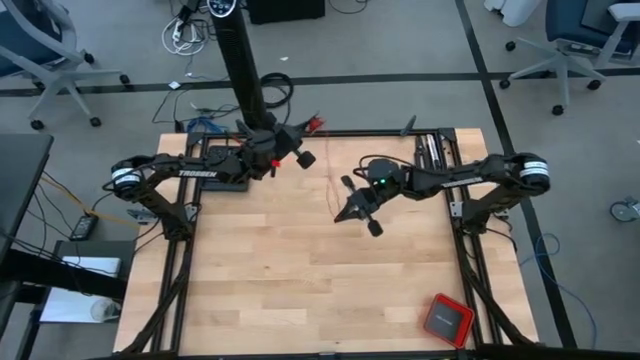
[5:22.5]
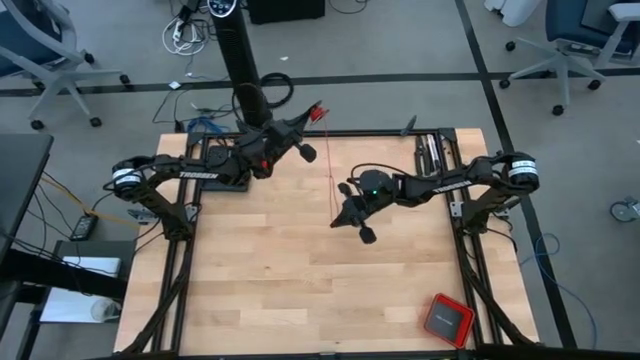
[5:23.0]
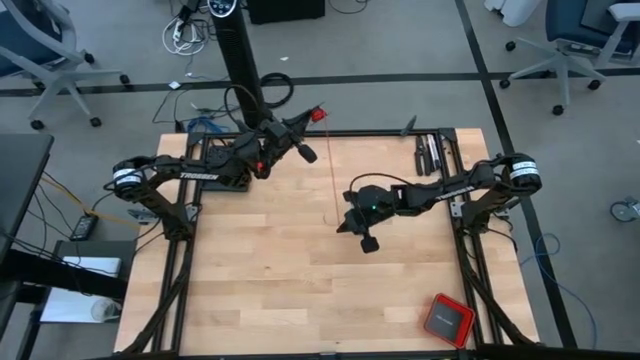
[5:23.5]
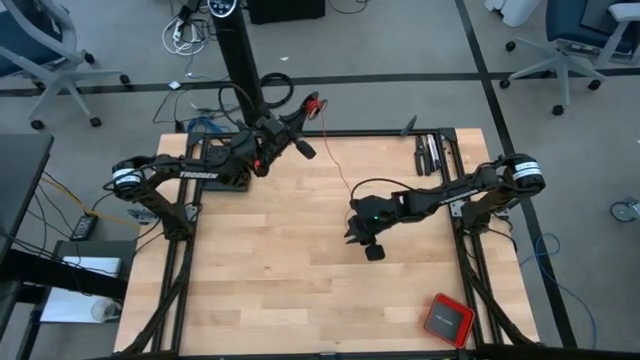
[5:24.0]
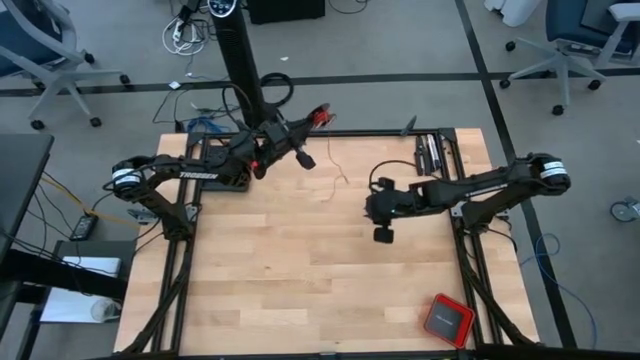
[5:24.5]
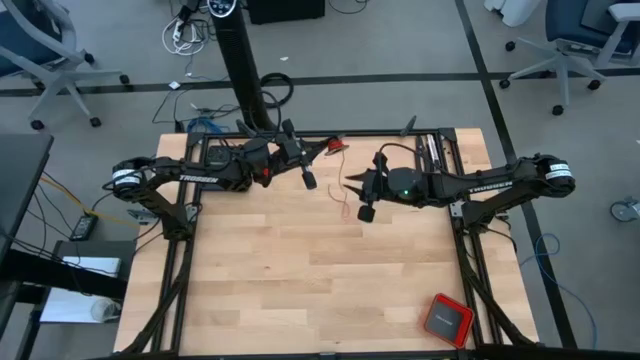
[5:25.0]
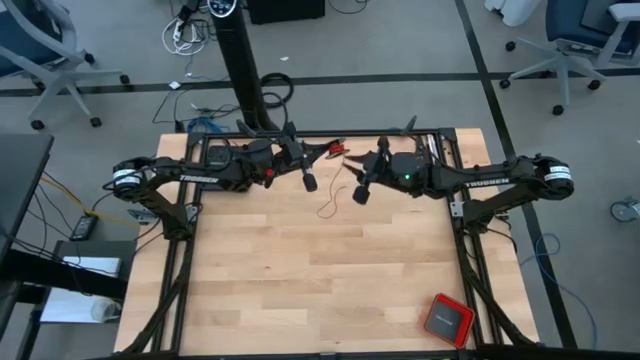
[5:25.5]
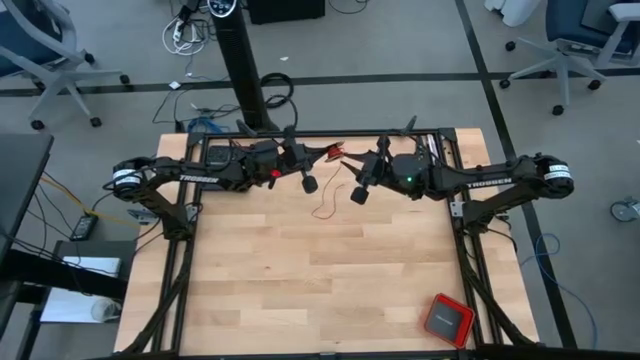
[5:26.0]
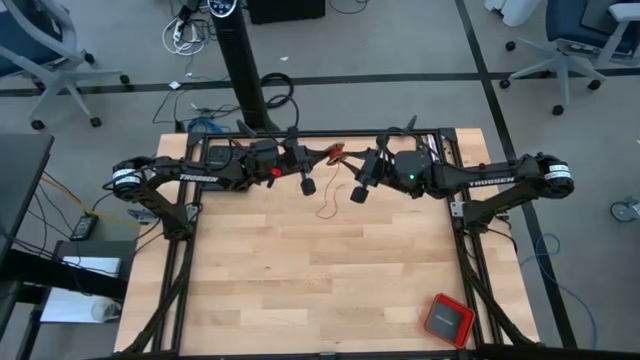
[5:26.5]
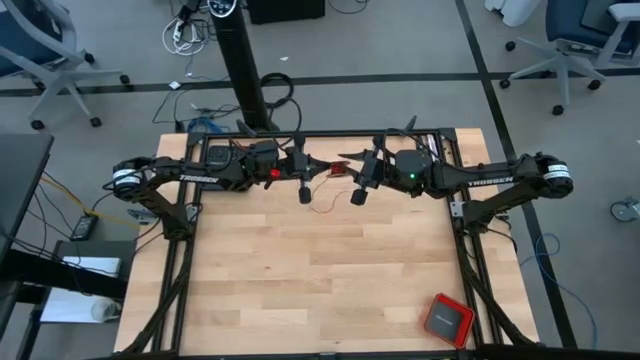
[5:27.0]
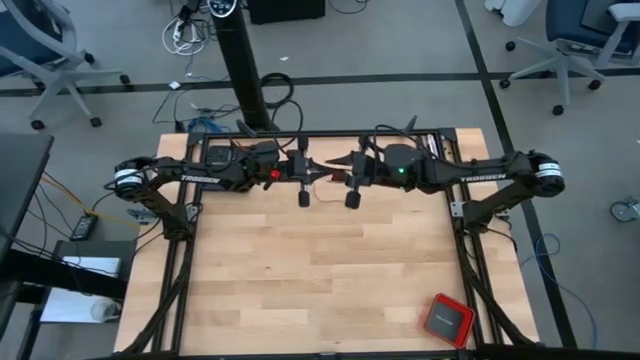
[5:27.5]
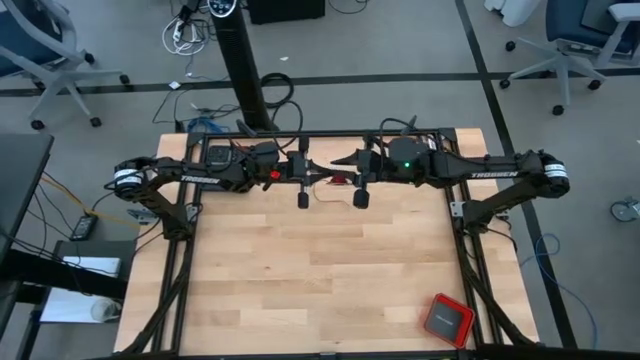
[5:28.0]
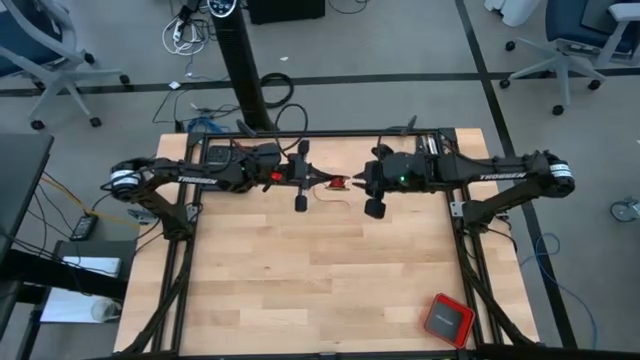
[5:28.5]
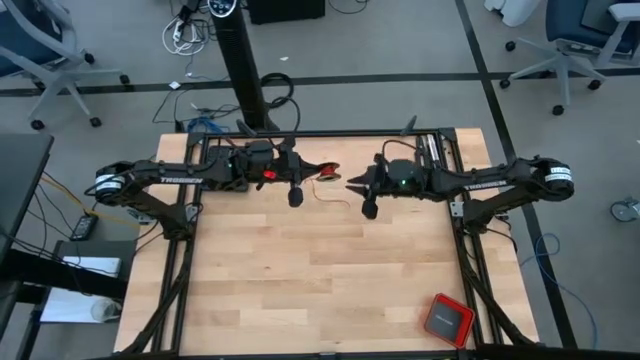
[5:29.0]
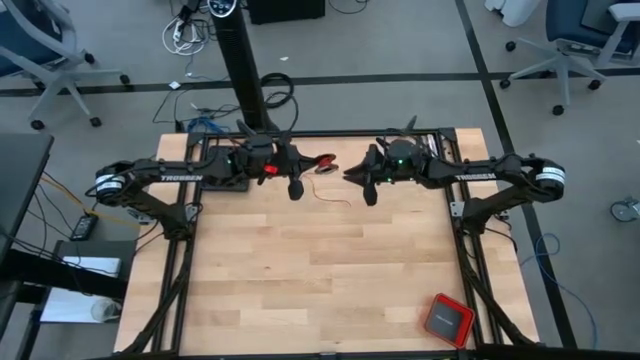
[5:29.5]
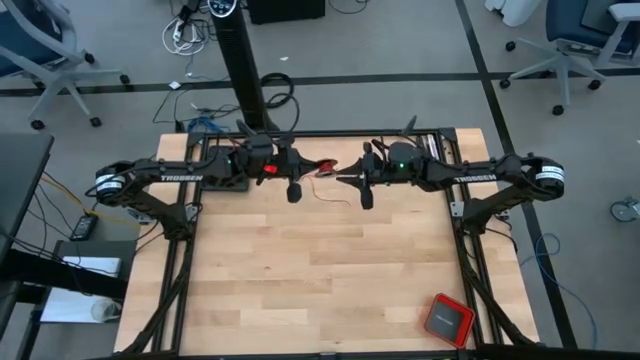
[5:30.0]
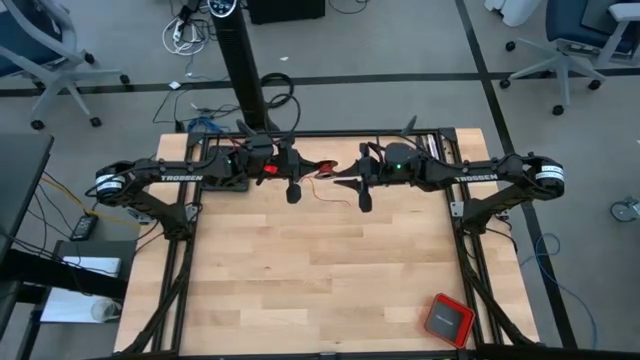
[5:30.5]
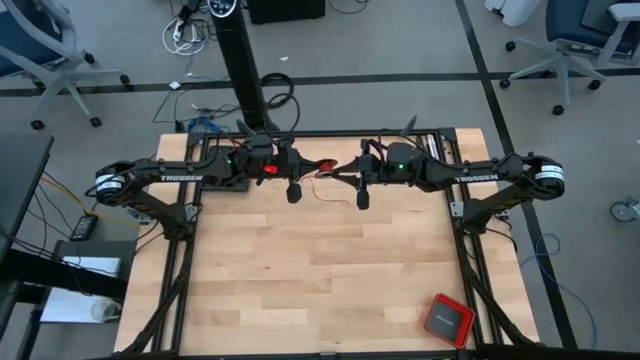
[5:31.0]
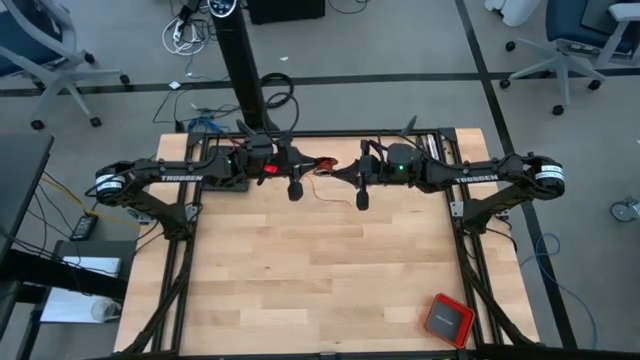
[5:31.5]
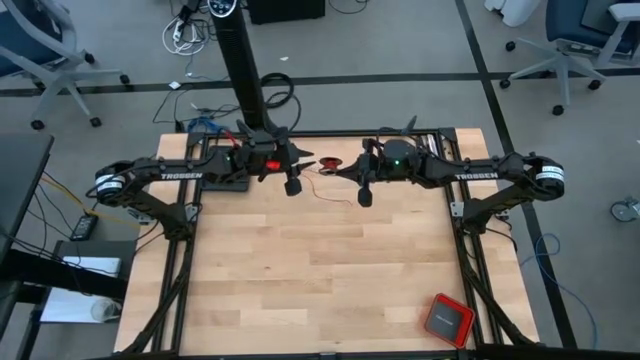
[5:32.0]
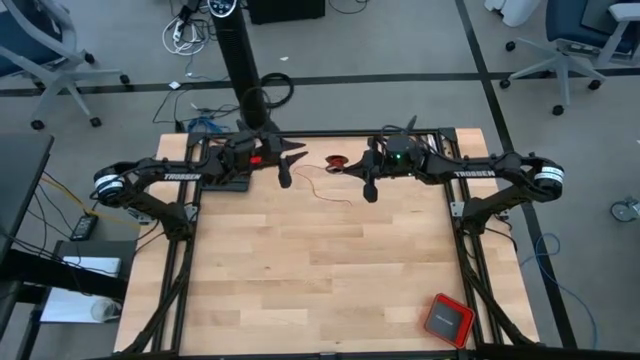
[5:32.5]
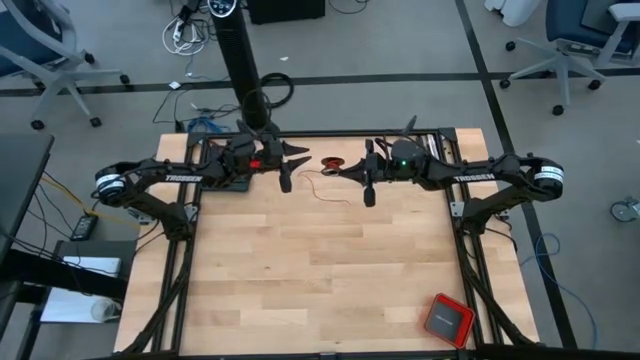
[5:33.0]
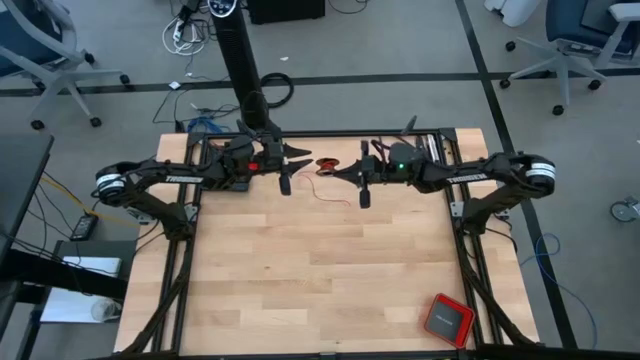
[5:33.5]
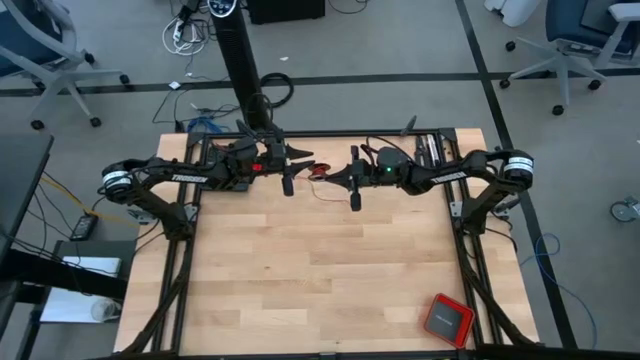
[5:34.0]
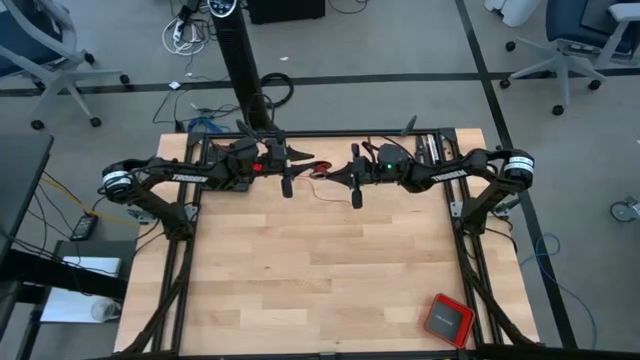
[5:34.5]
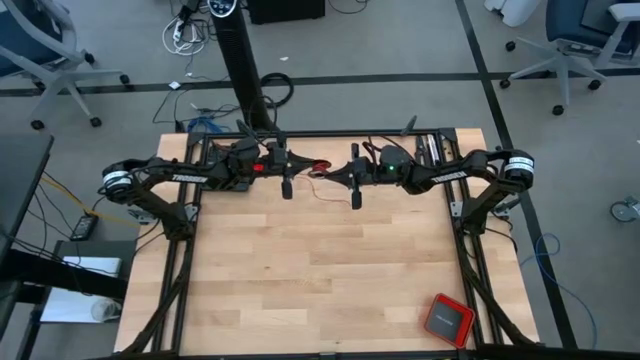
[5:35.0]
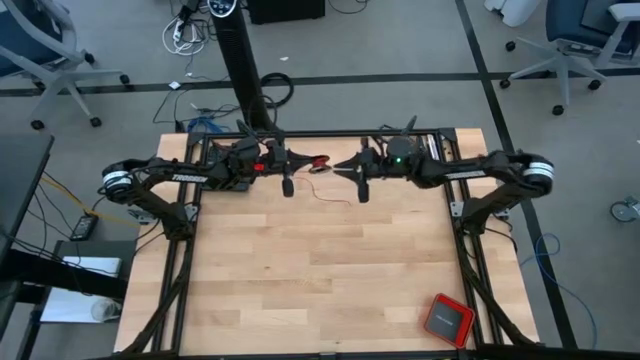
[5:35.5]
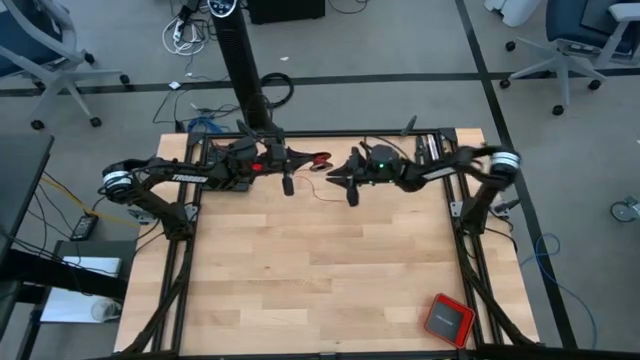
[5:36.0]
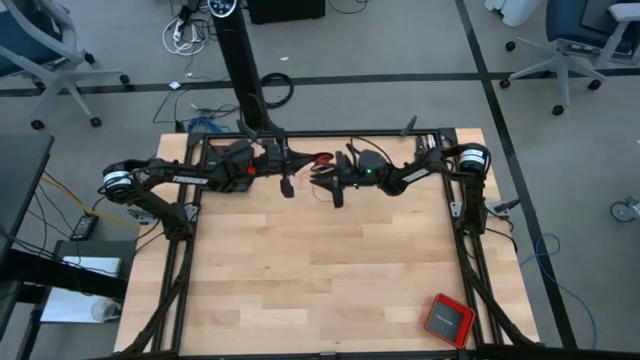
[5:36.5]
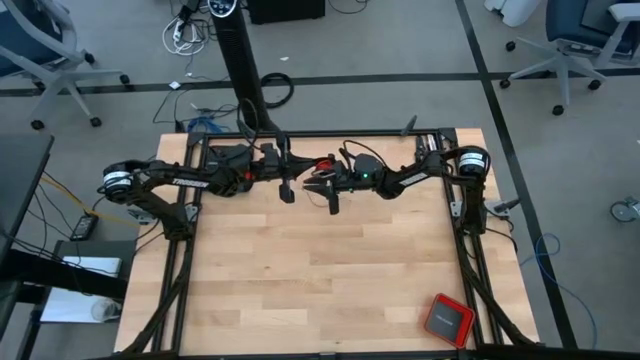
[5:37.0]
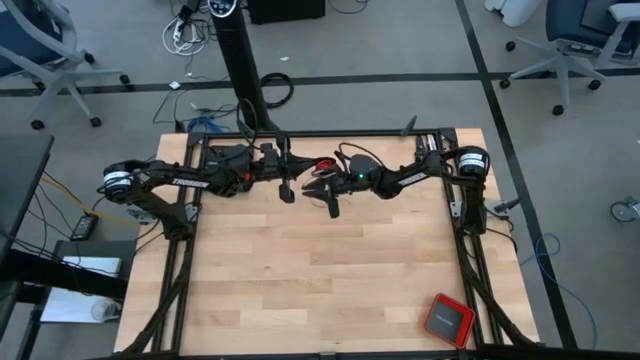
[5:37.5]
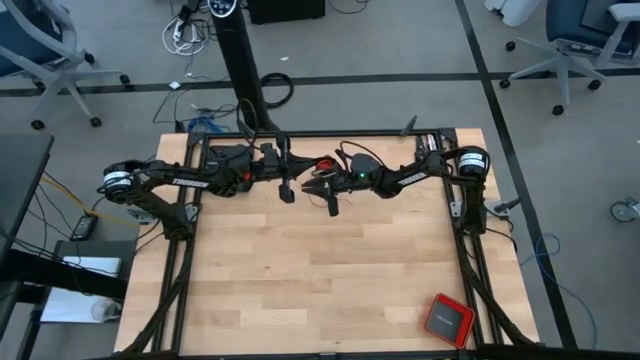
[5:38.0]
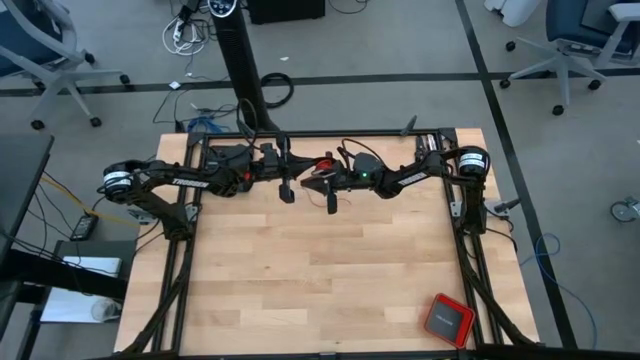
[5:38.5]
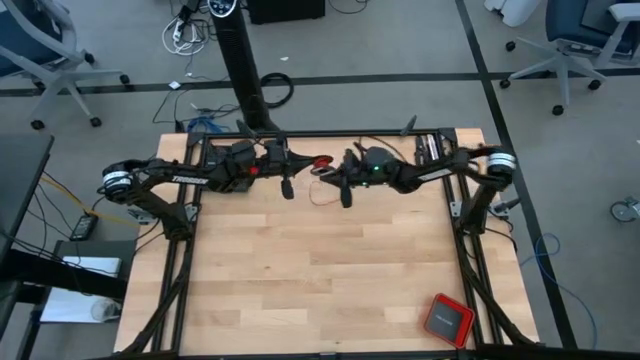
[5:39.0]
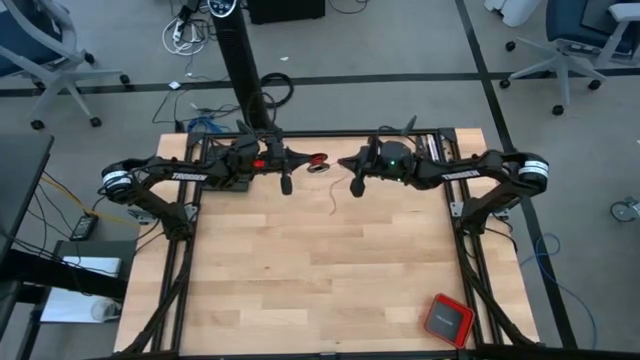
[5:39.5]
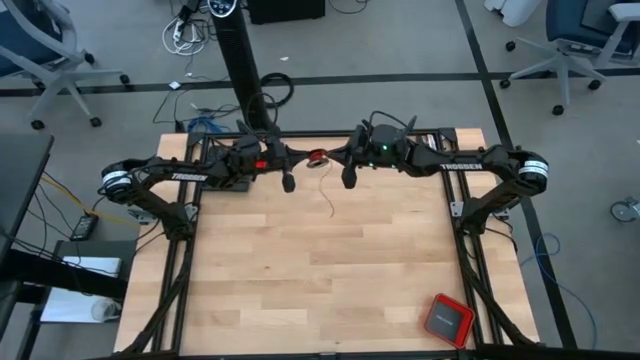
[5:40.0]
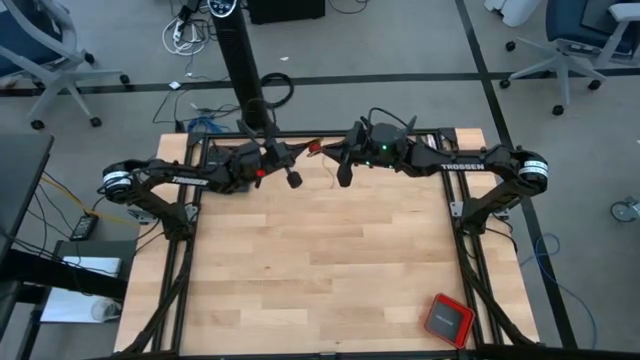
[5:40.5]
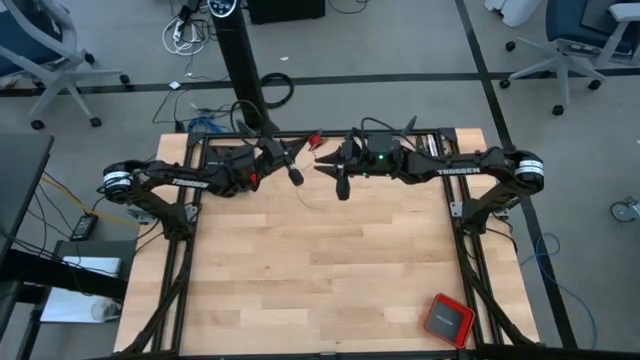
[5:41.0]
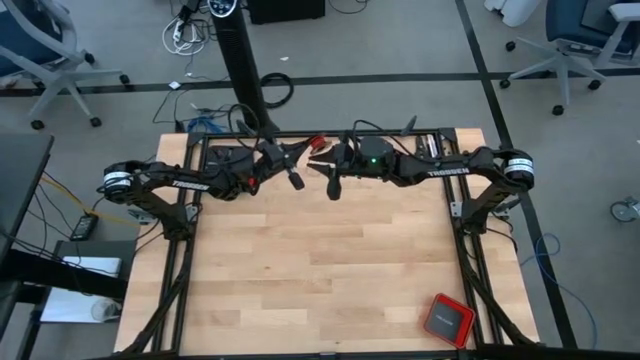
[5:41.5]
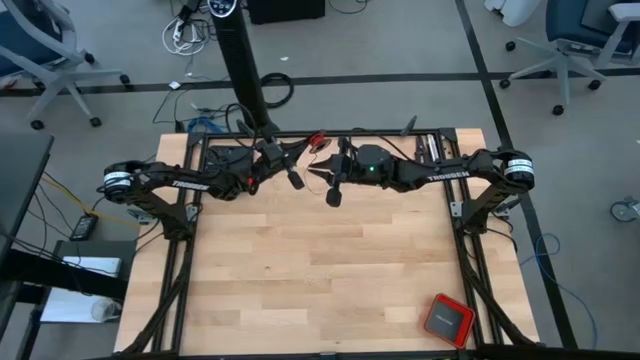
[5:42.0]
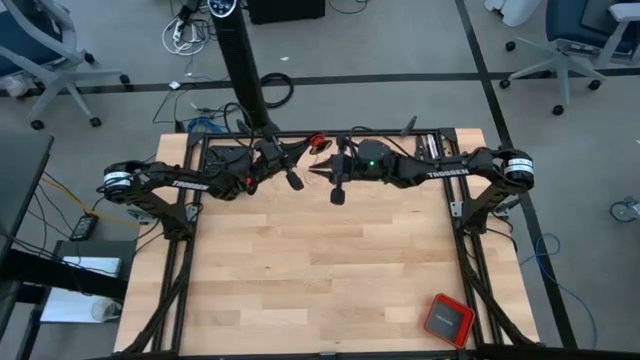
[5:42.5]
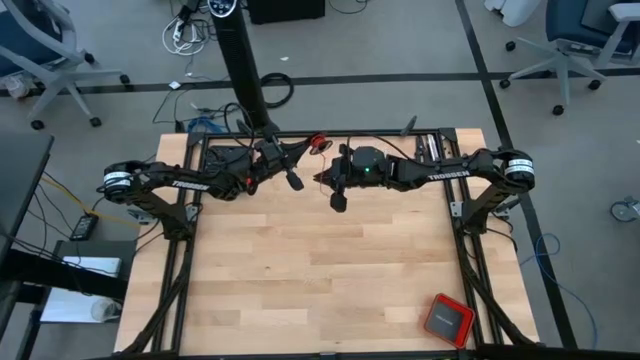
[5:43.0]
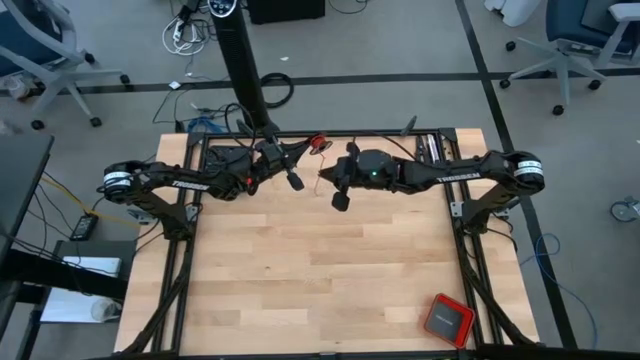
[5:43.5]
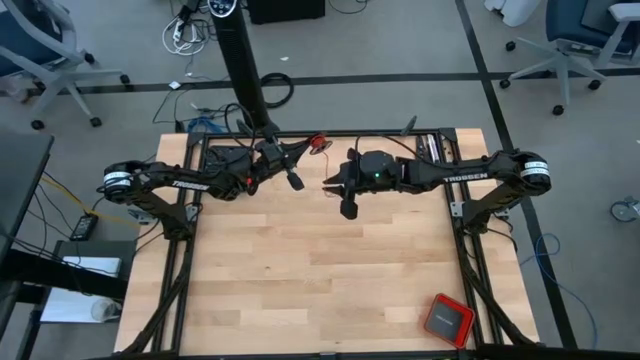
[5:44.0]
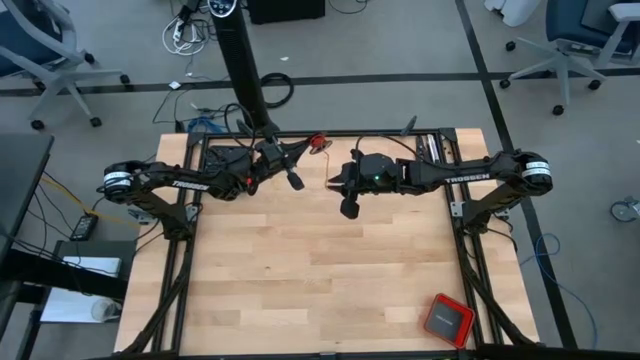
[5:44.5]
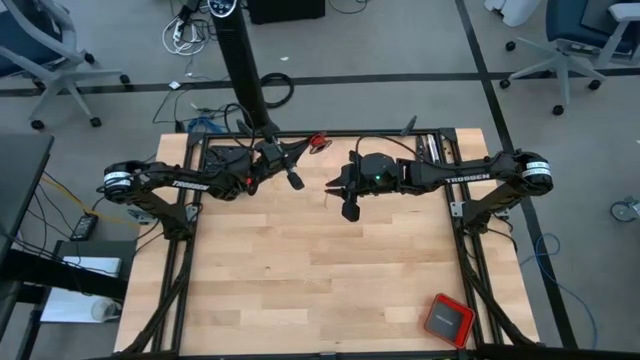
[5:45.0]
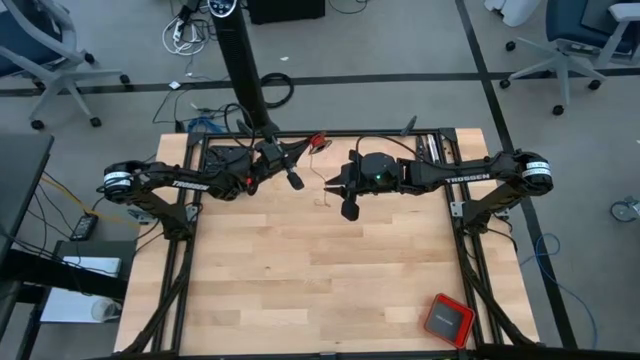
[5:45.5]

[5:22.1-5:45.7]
Task: Coil cords
Coil the red wire onto the spool
